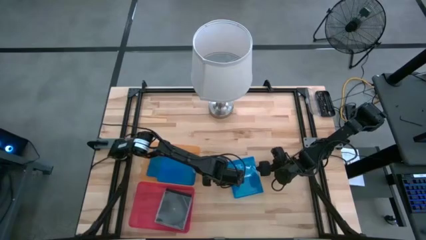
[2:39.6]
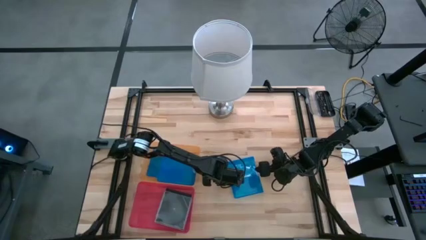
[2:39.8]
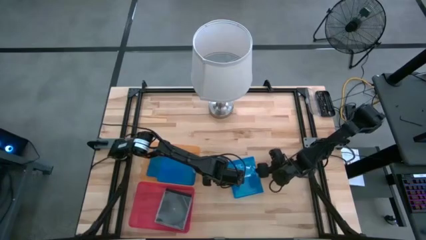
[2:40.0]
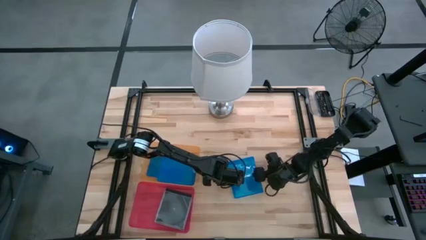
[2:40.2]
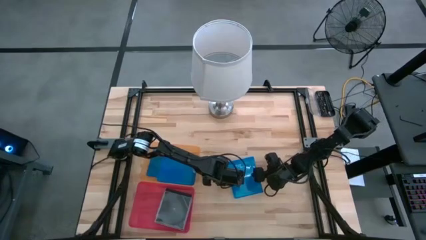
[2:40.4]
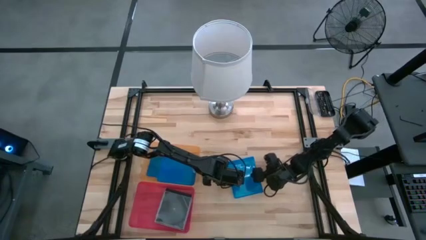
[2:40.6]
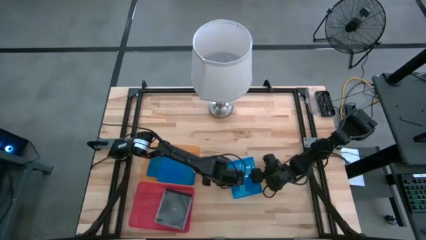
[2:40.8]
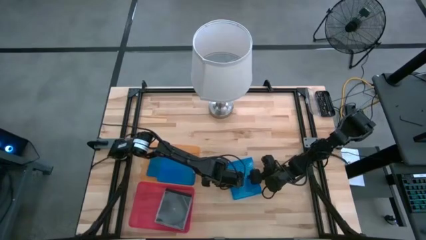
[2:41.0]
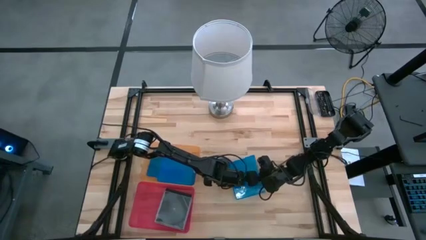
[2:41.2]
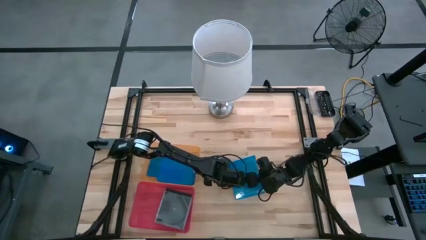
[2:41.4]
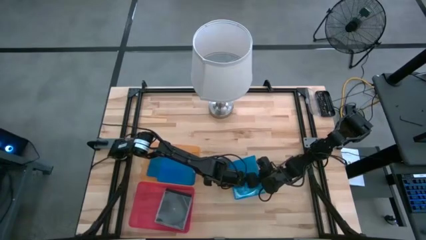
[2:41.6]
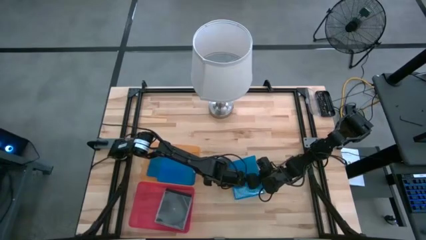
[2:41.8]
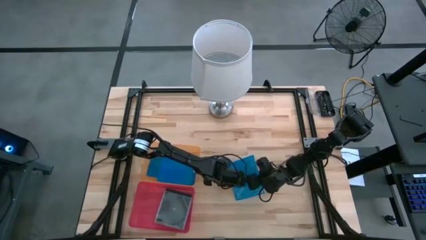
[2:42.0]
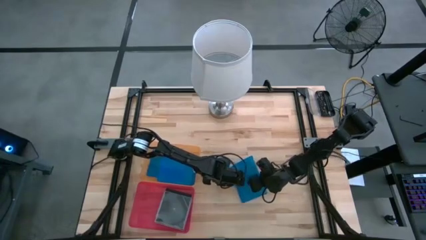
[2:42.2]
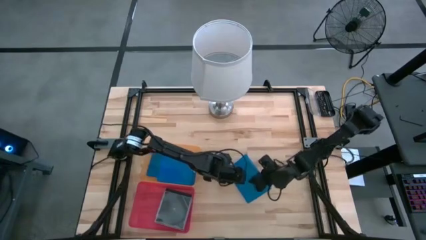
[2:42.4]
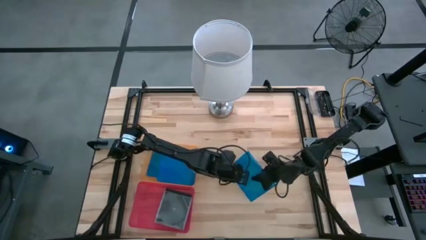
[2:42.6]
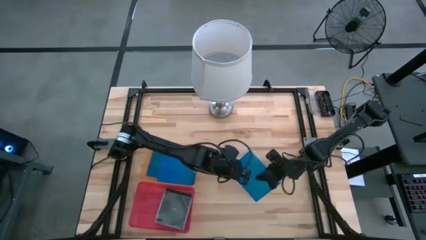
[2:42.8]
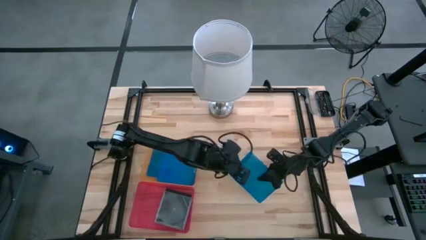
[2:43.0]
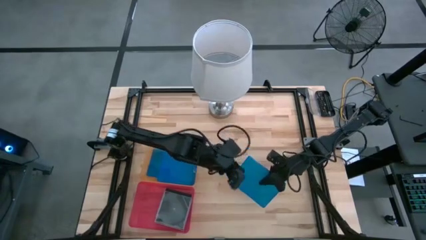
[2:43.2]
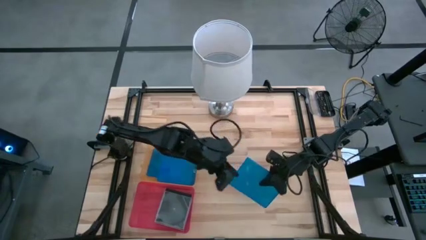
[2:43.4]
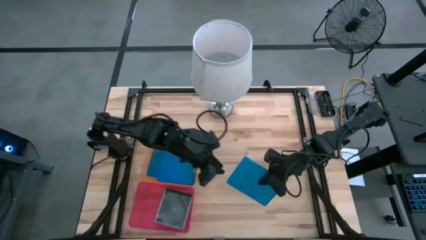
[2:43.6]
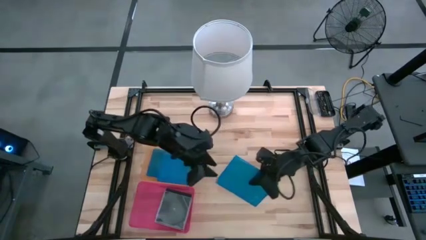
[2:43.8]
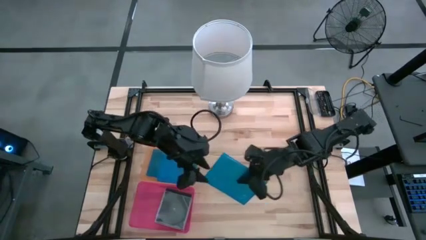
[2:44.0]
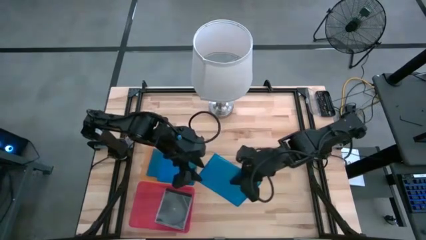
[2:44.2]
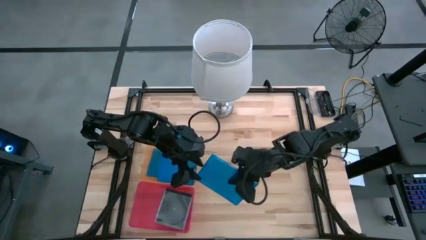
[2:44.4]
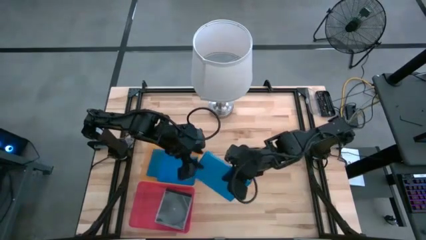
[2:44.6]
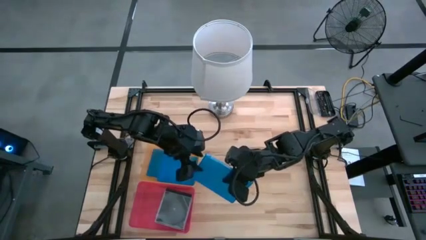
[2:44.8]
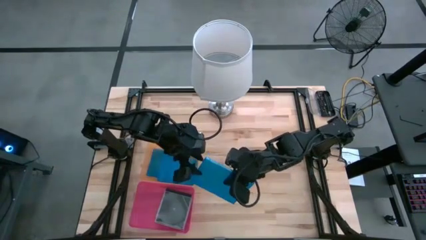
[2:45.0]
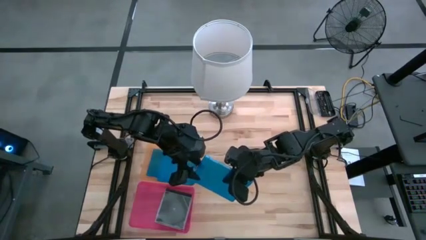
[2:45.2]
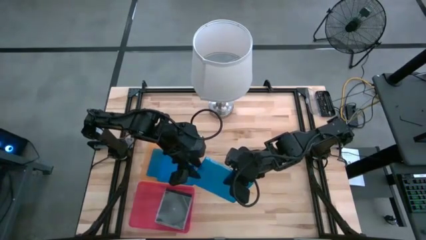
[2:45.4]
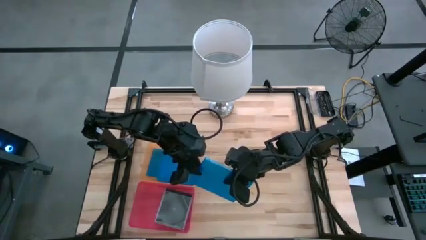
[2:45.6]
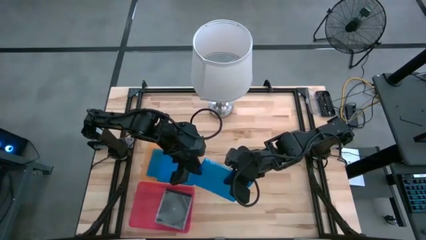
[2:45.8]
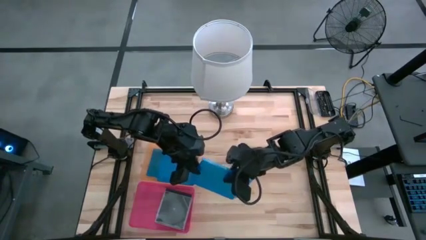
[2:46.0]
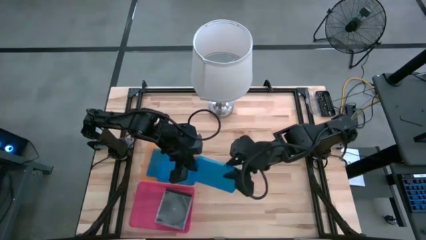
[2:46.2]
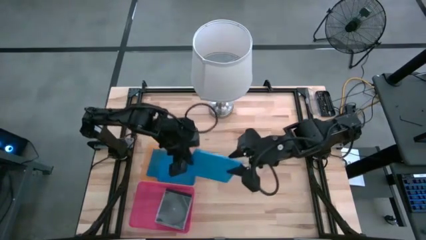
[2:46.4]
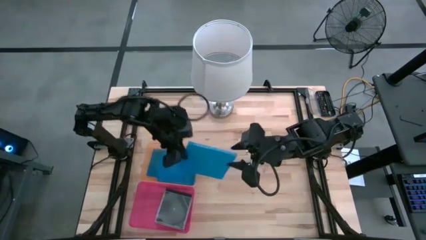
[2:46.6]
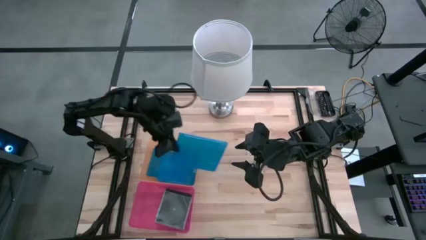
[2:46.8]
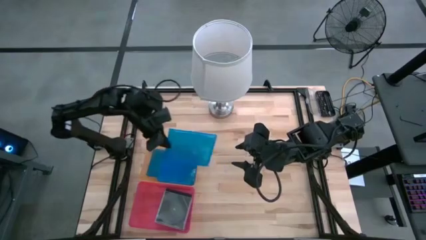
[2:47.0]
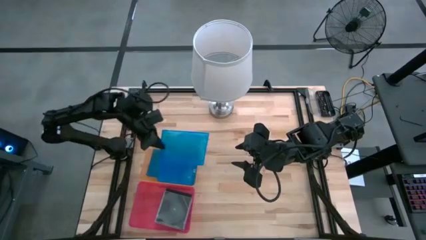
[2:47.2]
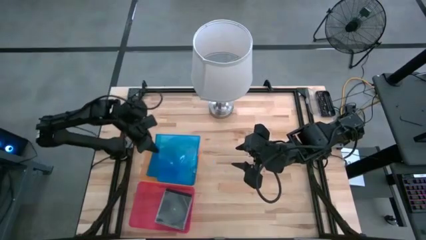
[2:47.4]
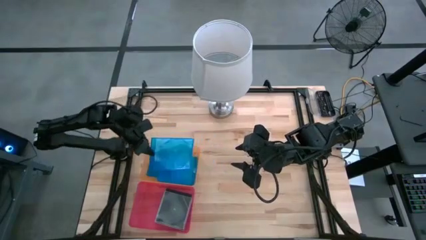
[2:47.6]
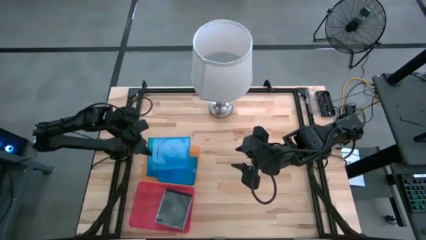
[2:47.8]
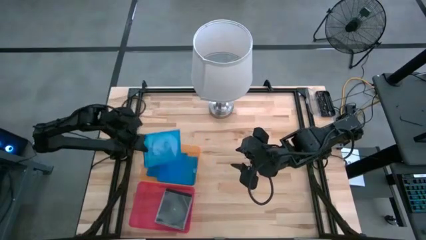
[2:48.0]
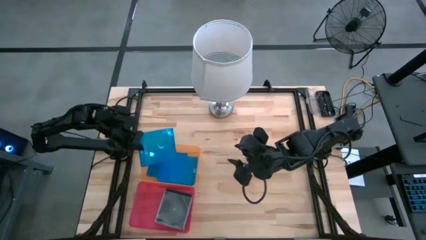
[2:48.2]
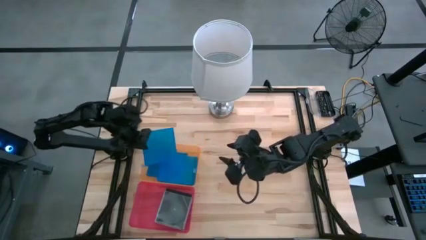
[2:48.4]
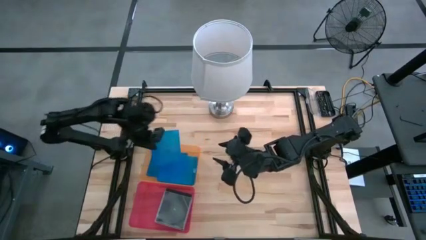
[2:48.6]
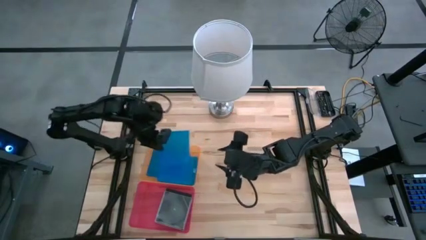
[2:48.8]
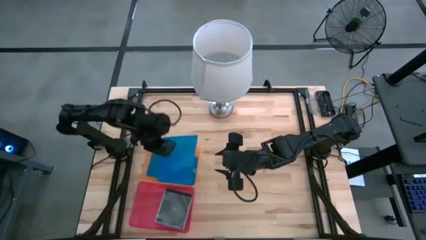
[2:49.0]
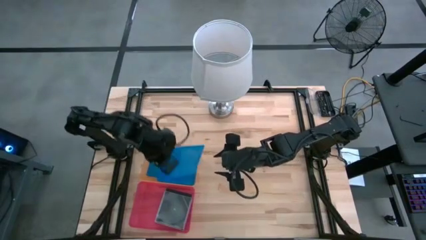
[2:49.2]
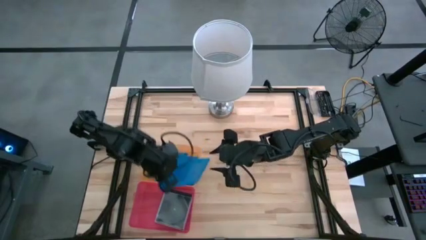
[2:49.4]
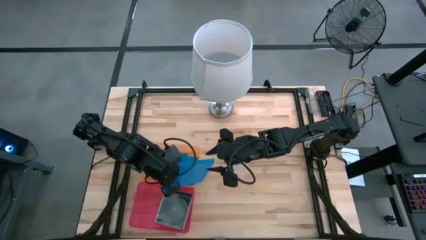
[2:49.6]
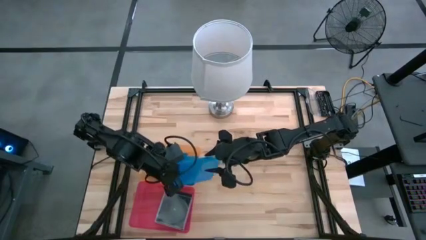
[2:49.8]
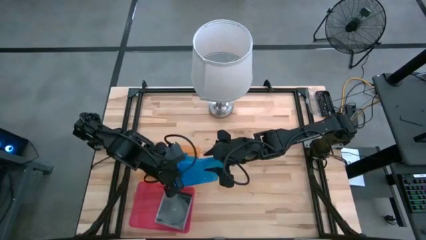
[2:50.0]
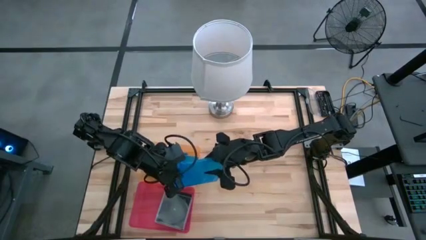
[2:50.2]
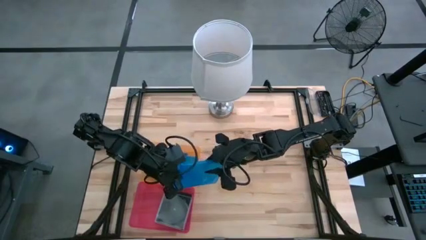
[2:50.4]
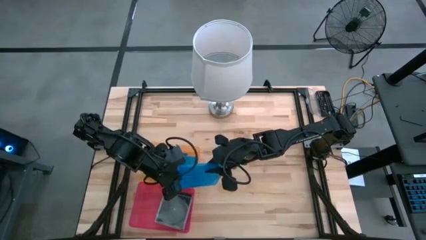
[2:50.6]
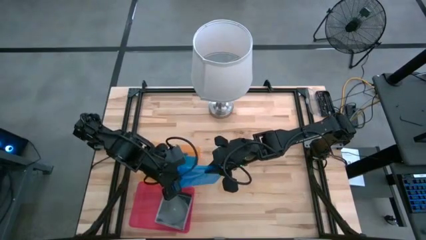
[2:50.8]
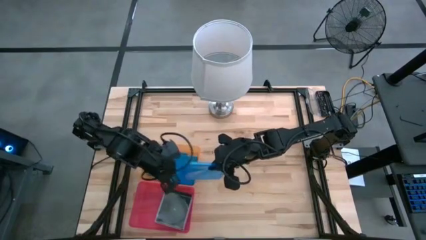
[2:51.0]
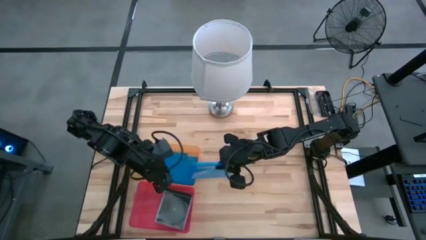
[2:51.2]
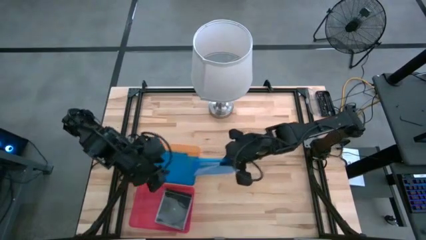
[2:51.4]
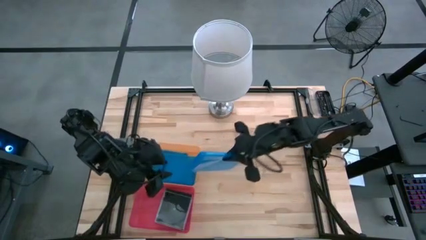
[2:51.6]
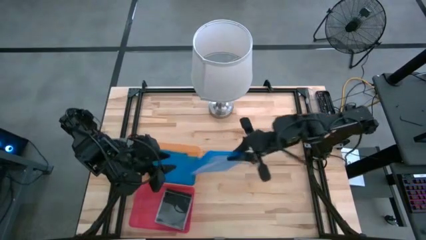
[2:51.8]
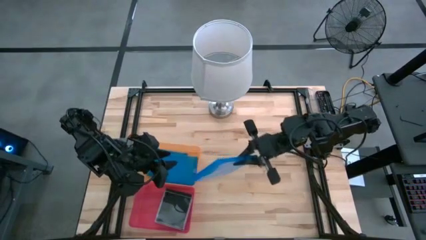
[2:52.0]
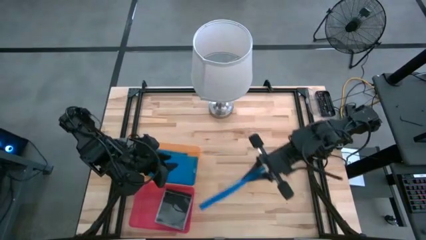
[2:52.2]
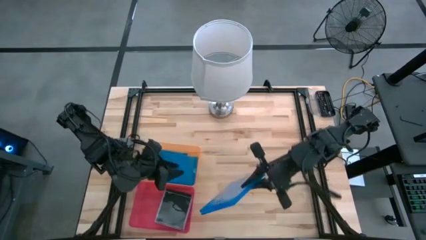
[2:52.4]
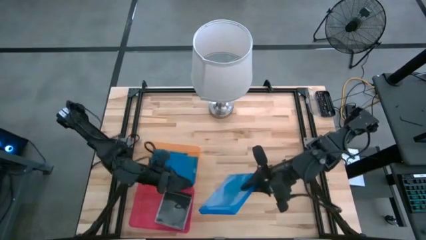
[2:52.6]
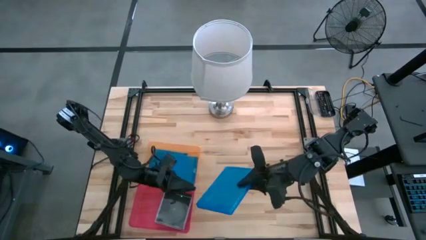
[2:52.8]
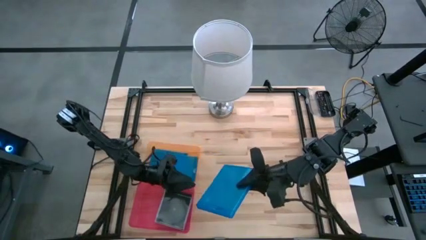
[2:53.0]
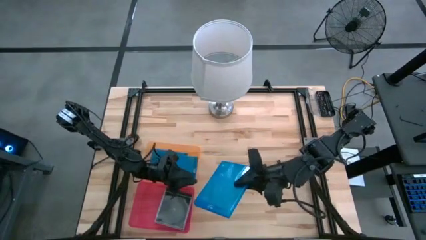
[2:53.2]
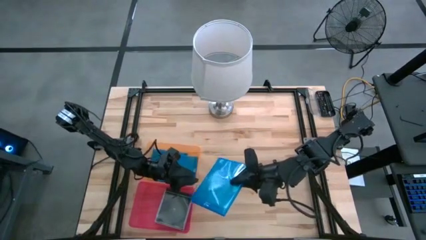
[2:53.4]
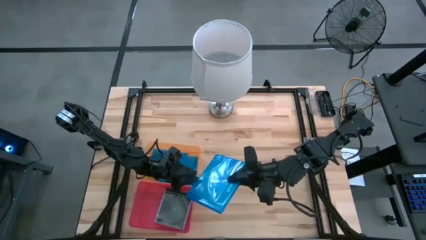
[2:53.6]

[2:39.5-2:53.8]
Task: Pick & place jewel cases by type
Put the blue CD case into the orange bin

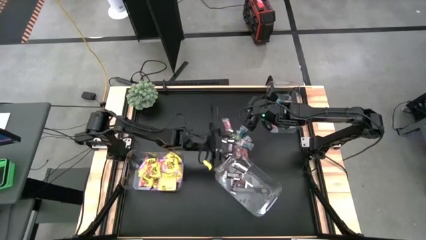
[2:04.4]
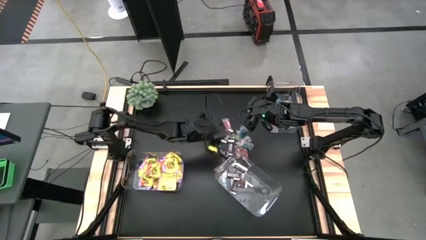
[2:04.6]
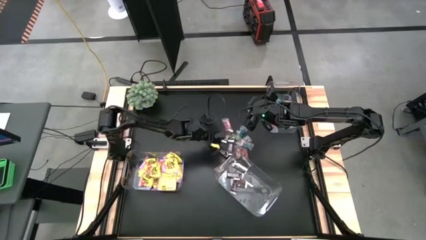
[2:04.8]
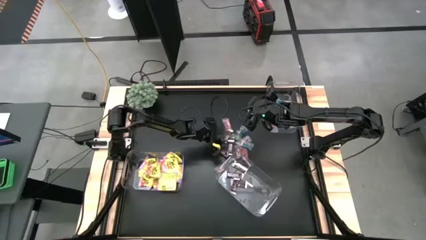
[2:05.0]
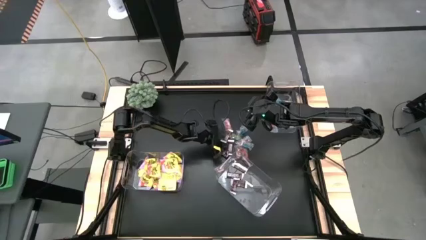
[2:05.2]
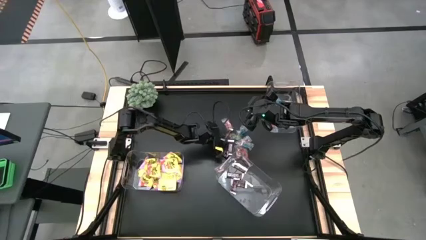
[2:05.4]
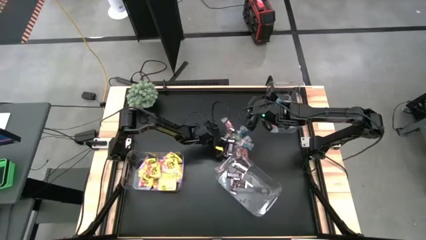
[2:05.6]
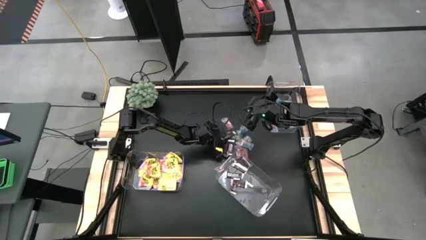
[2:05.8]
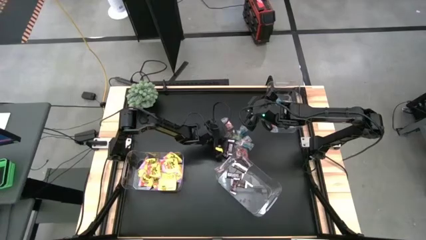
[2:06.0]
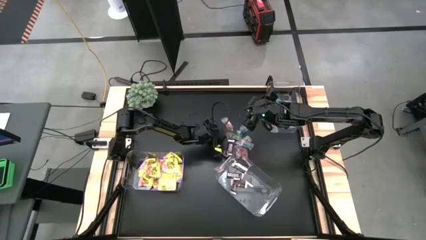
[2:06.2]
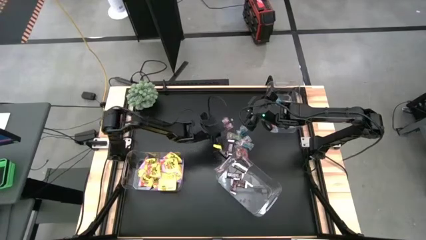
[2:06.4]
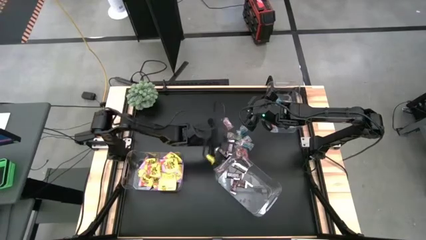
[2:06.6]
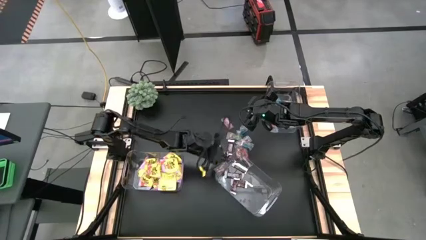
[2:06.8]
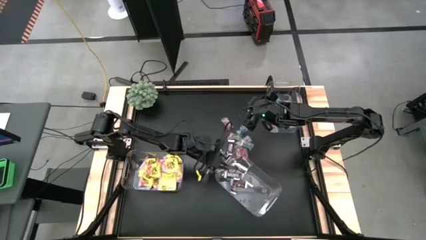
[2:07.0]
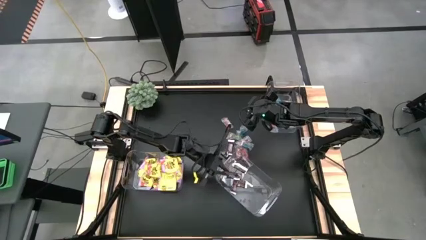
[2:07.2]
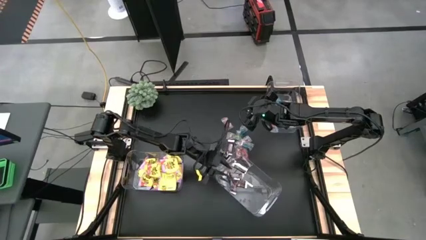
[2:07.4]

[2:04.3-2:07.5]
Task: Sort candy
Put the brown candy in the bottom right transparent container
